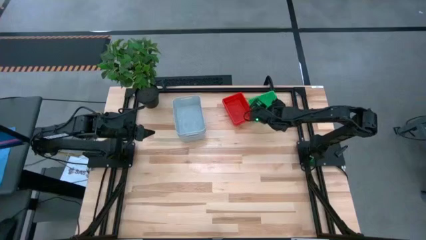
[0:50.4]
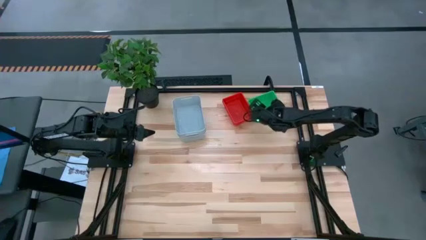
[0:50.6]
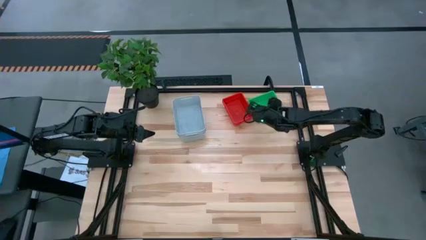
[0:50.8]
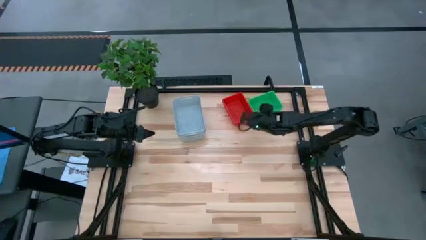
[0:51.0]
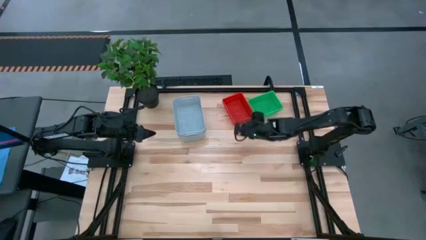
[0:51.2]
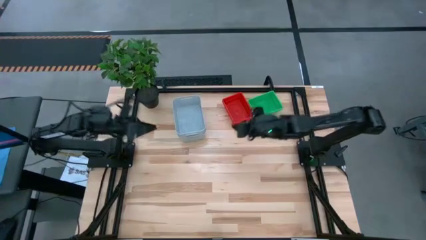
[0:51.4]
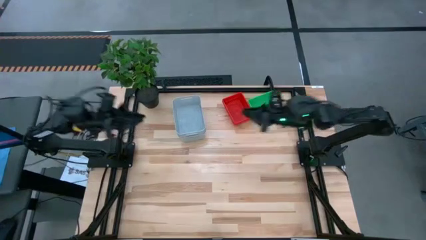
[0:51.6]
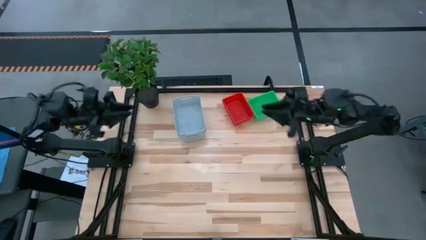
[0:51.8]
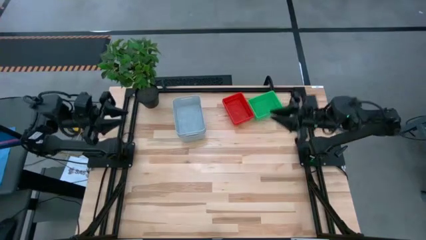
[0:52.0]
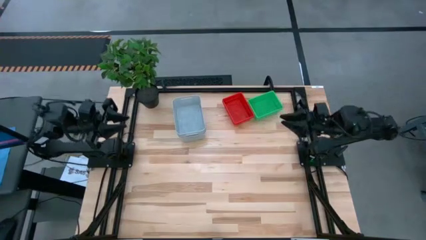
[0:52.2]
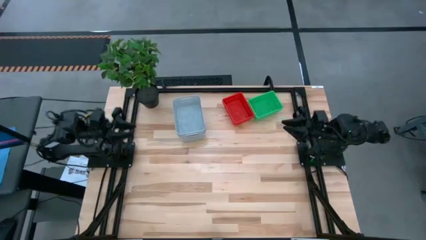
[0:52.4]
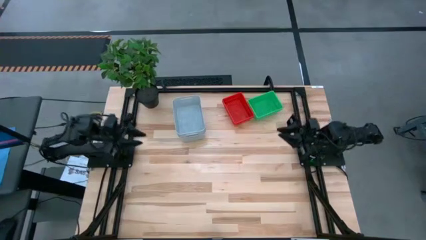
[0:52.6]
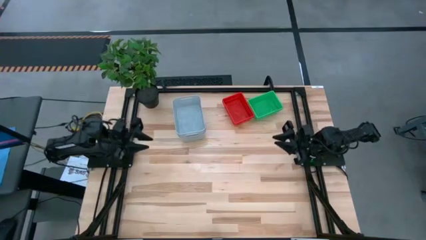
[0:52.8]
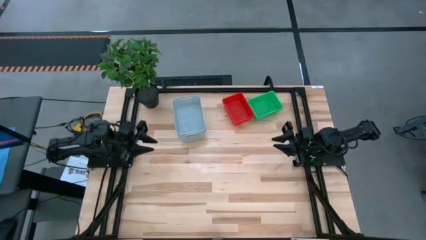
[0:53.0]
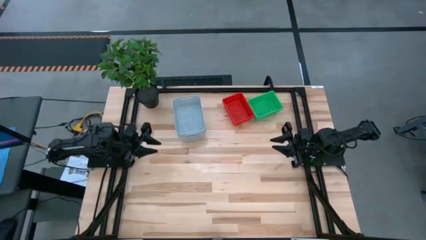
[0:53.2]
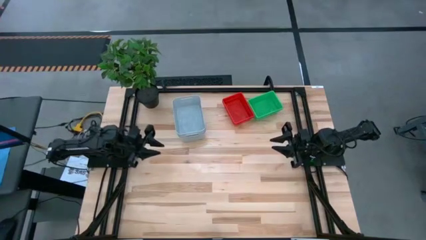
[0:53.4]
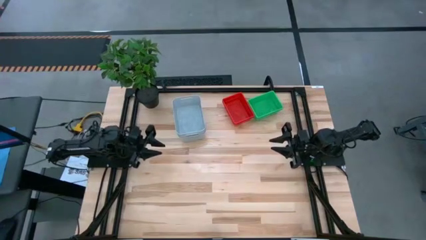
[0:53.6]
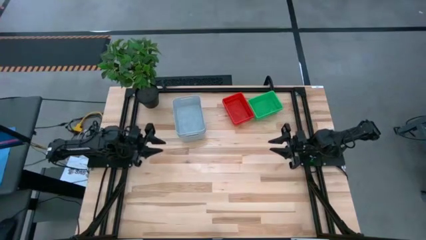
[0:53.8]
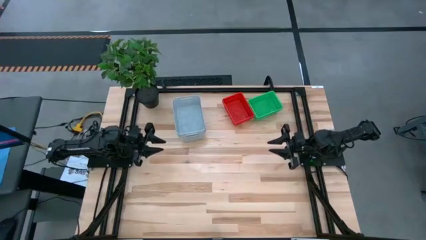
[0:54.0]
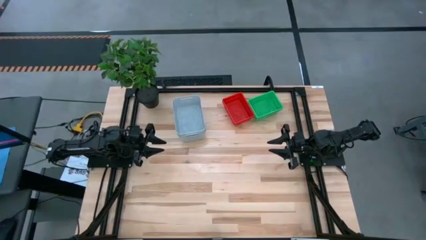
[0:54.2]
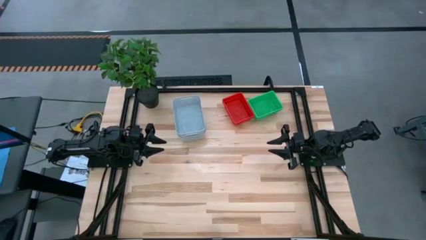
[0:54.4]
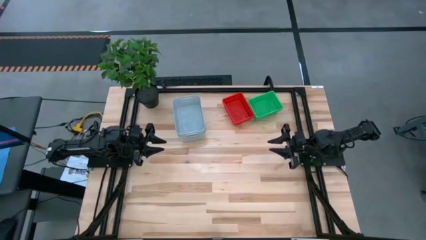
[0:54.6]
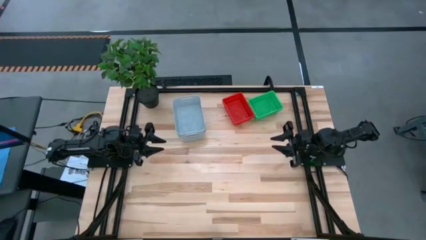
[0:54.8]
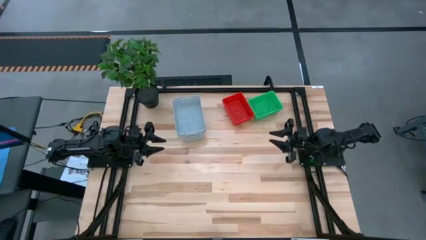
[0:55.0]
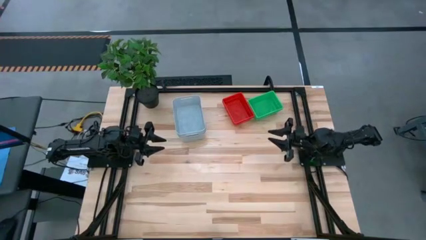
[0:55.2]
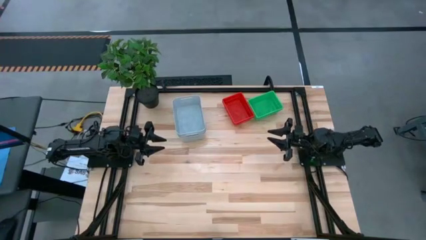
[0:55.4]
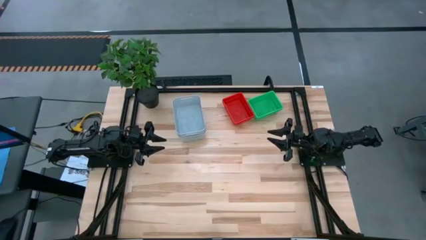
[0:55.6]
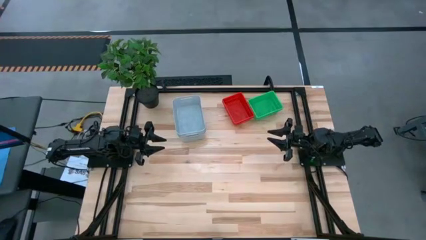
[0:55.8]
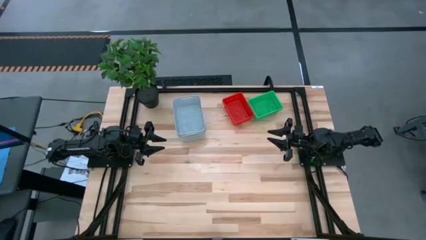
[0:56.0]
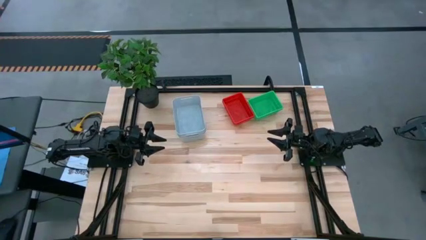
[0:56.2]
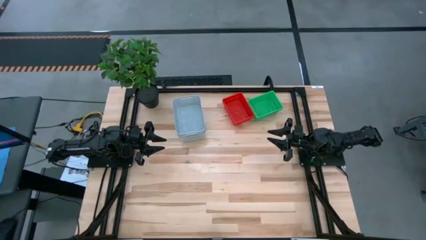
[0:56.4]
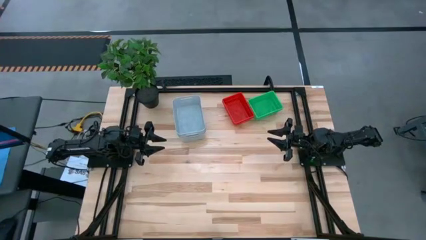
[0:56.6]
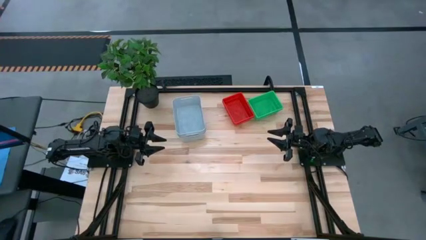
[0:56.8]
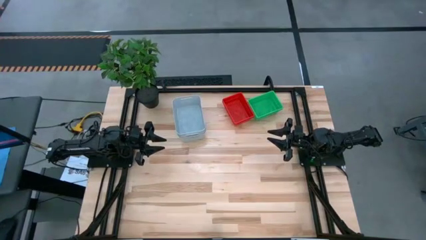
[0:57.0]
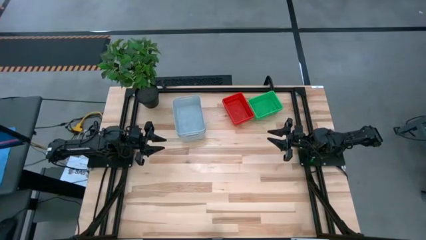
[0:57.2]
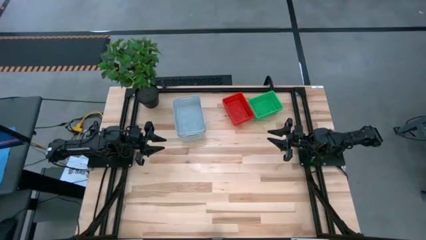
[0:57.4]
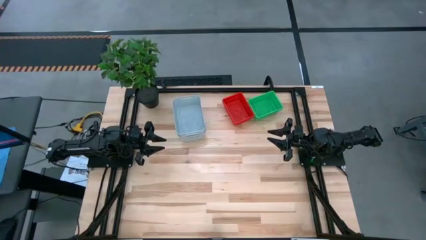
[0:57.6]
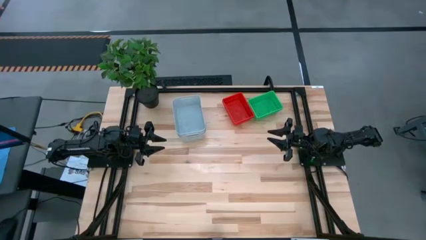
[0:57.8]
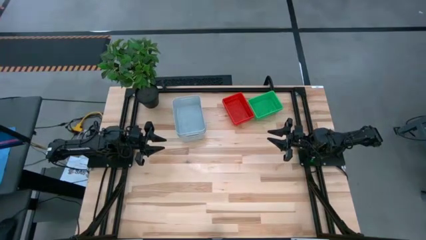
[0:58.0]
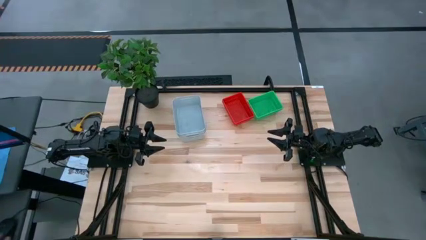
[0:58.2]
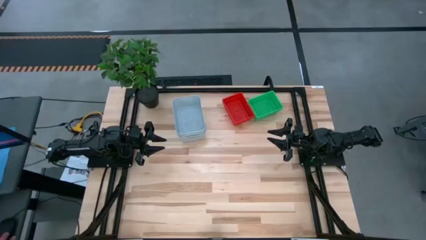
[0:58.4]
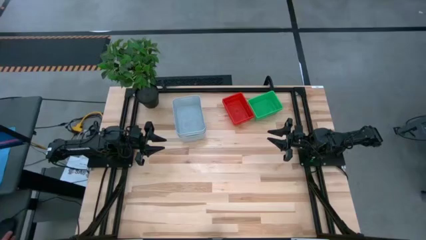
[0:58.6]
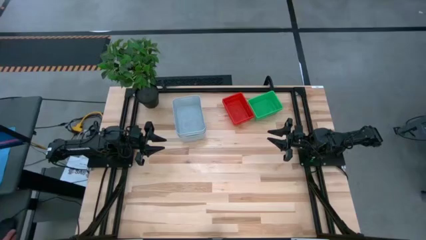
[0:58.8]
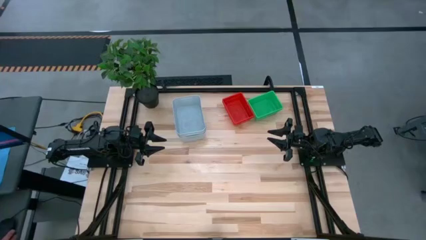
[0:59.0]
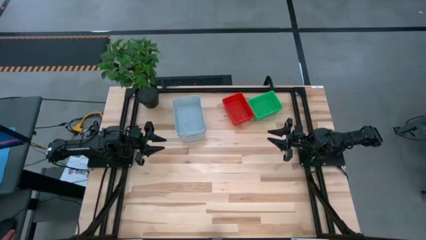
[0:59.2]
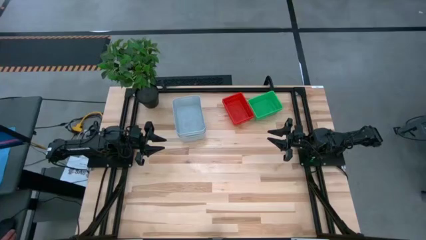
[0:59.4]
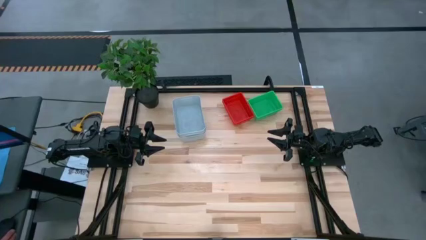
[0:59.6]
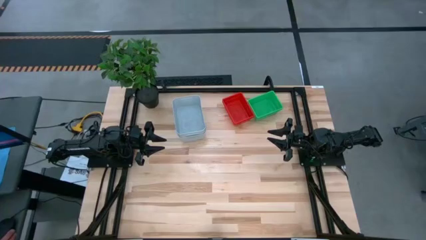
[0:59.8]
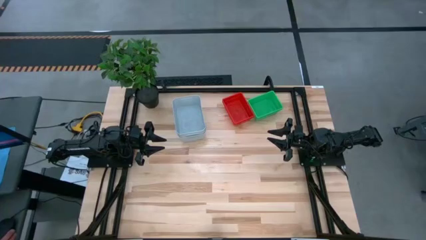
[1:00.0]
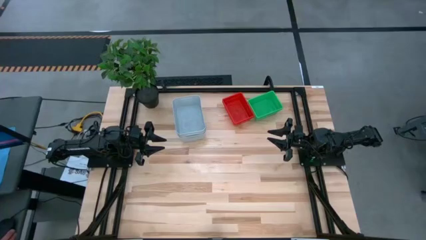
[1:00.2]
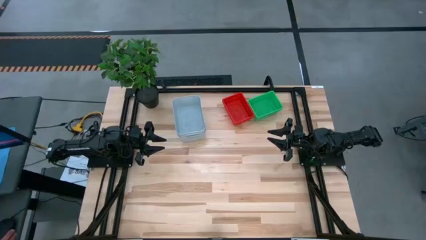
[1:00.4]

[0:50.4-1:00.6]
Return to Home Position
